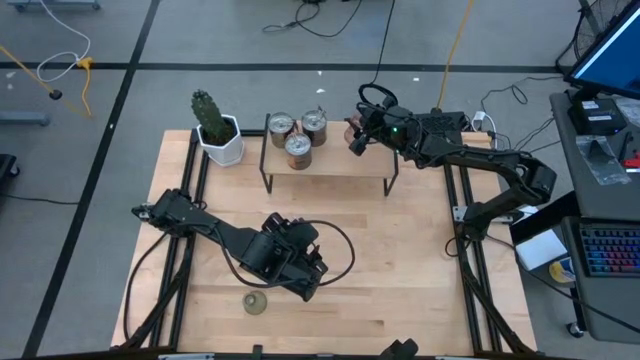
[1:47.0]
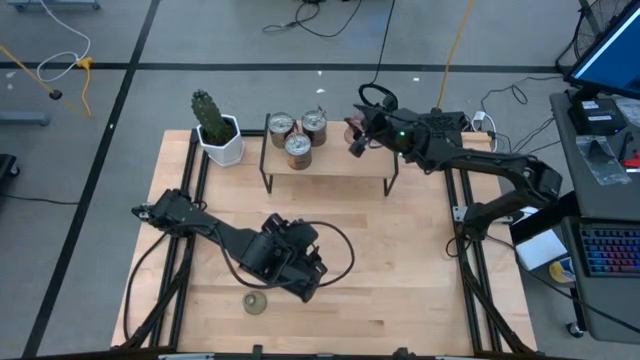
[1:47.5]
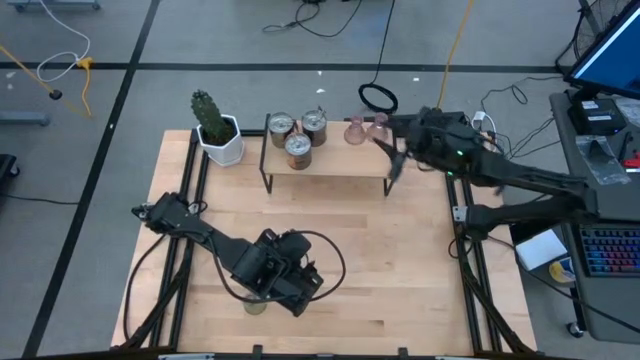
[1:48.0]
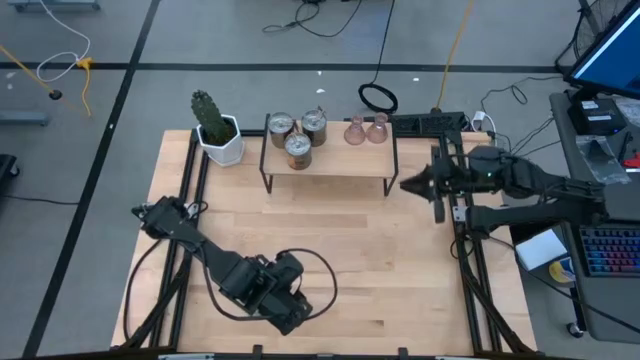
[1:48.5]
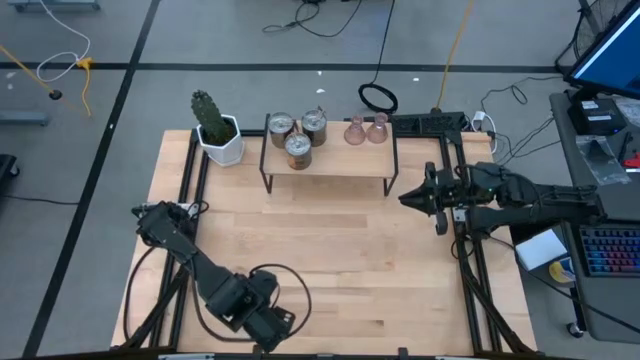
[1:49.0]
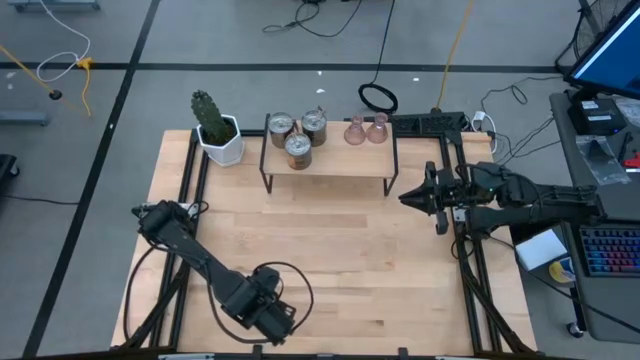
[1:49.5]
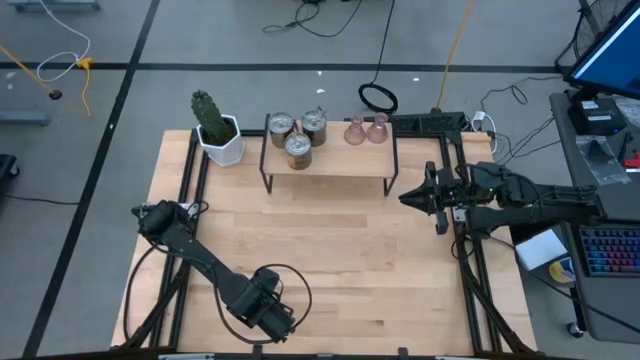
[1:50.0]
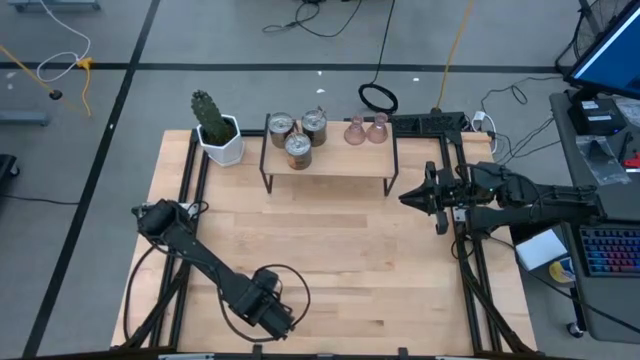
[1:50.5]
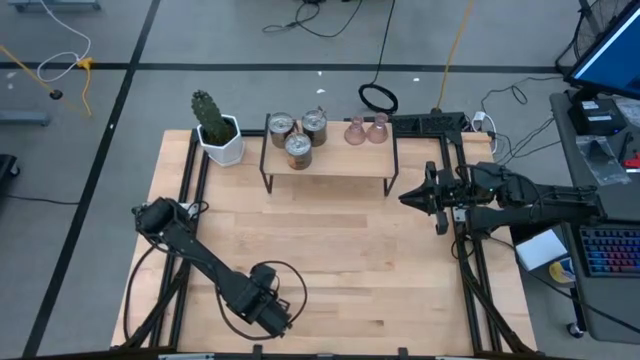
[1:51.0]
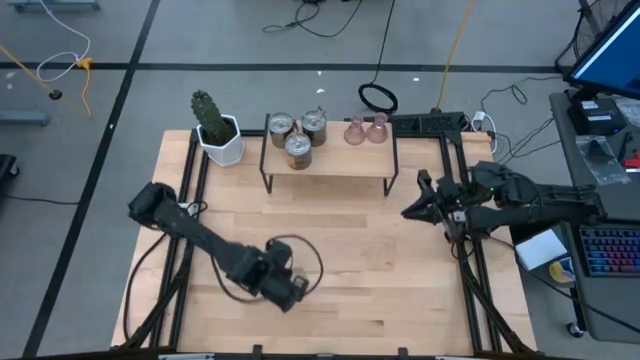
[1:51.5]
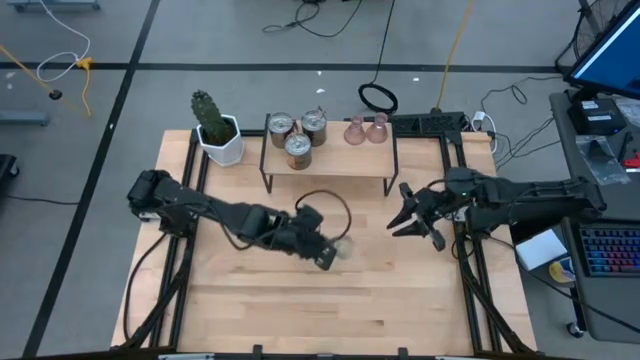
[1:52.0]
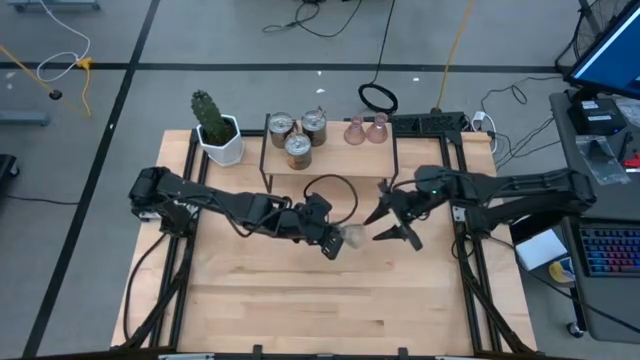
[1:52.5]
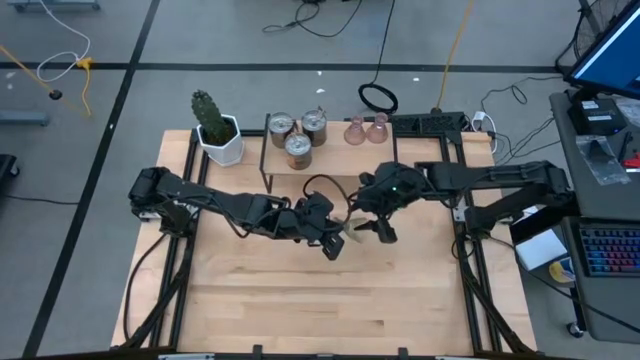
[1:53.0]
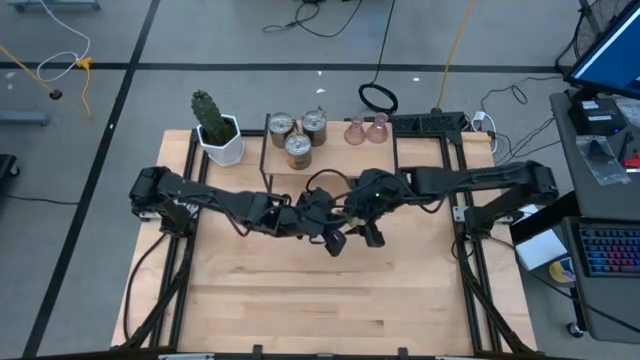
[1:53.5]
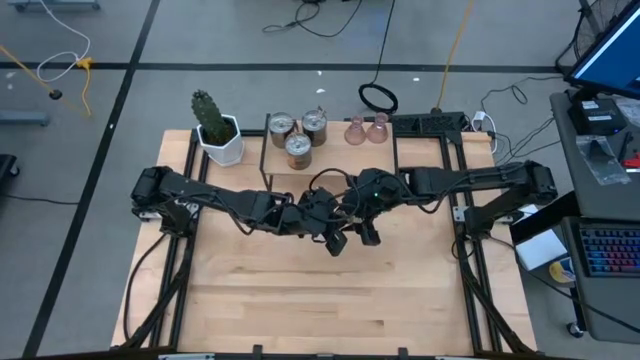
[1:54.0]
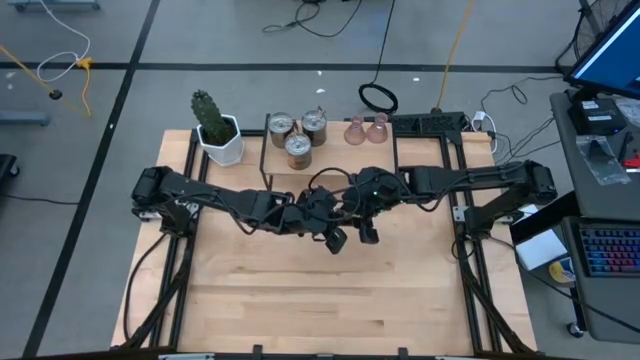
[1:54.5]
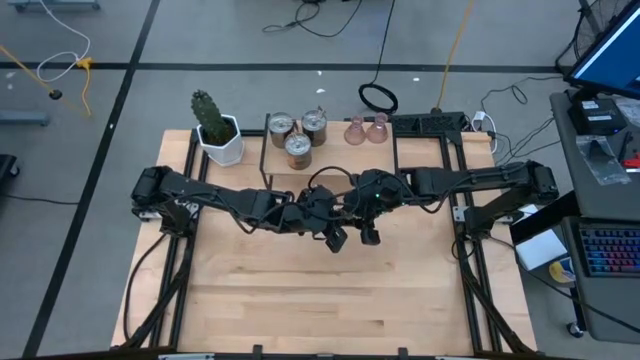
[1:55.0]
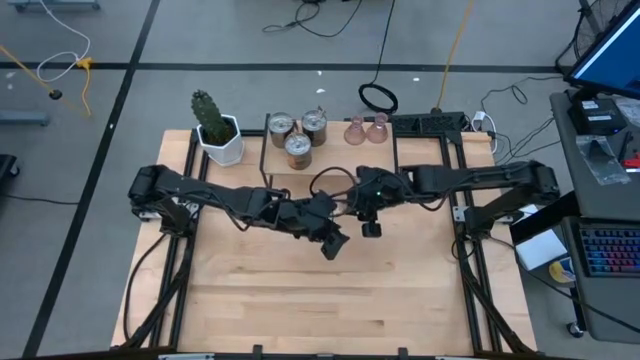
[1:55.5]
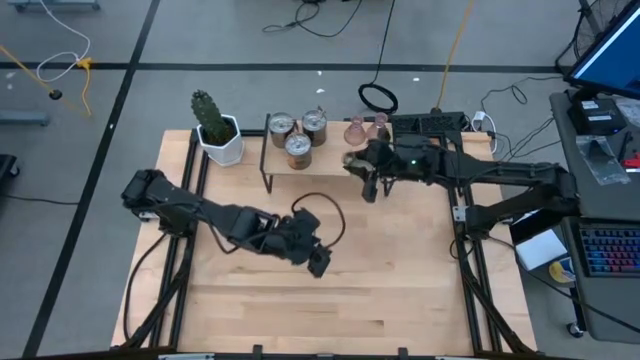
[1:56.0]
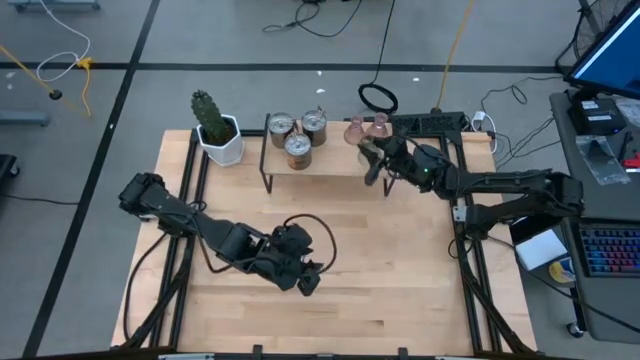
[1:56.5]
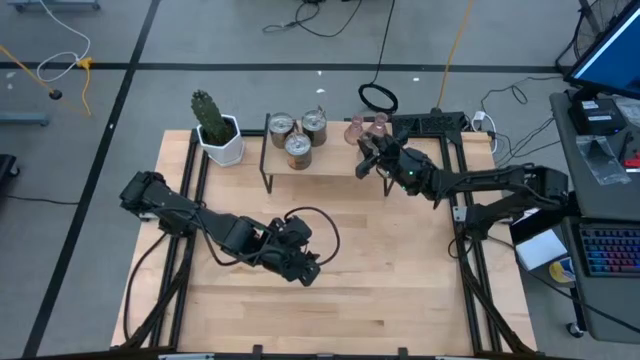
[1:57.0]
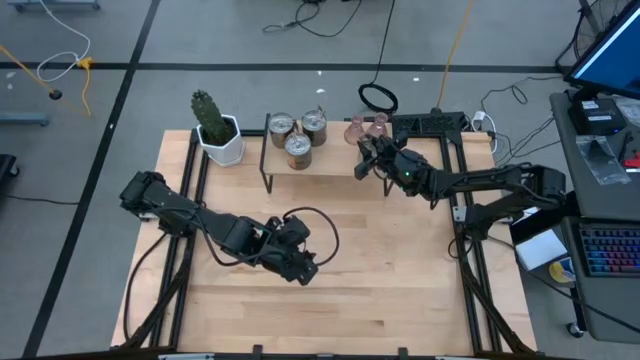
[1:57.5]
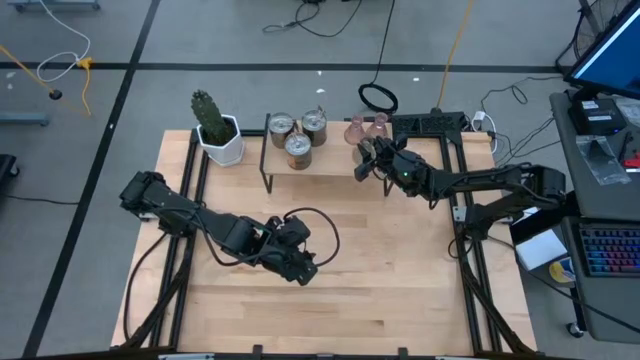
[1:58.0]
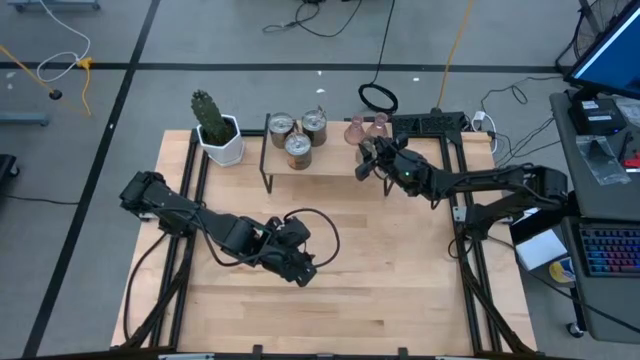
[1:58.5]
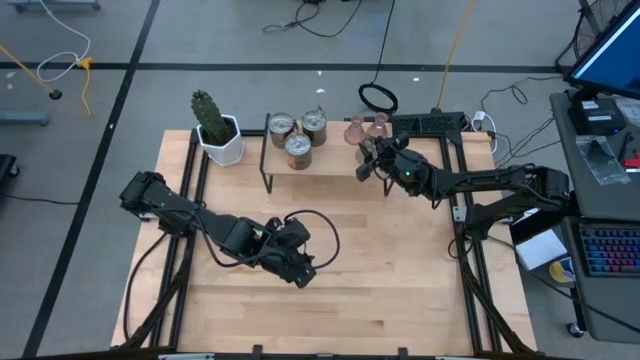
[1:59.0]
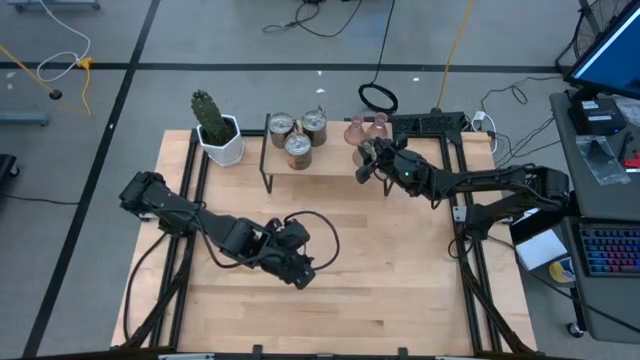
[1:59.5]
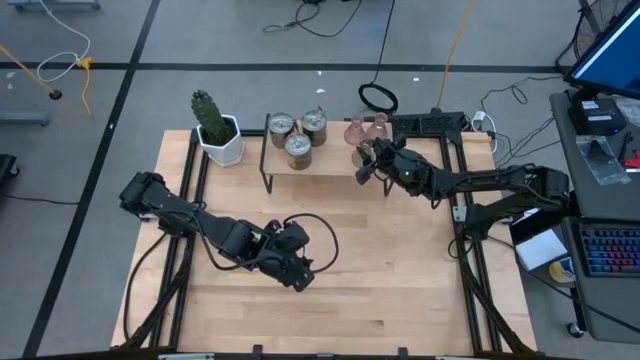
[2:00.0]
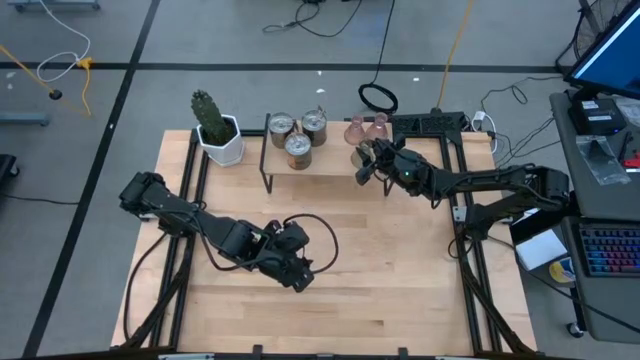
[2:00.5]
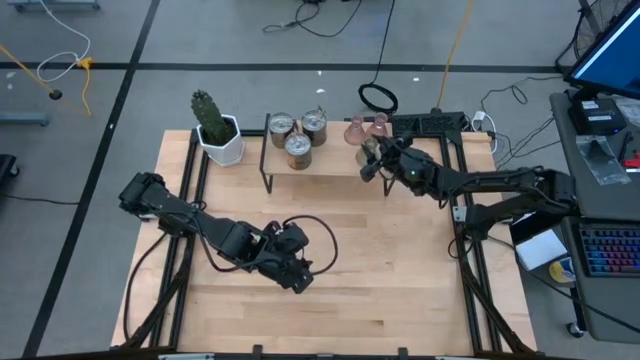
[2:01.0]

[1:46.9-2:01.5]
Task: Pick & Place candle stick holders
Put the green glass candle holder on the shelf

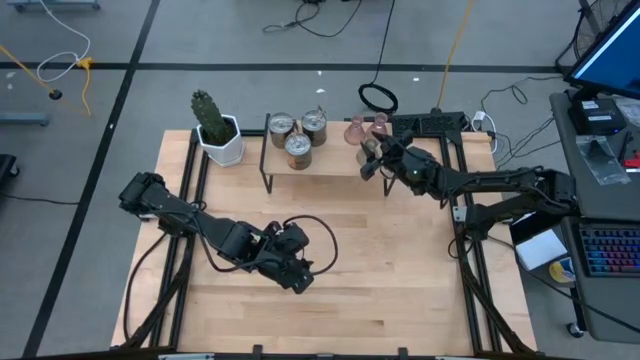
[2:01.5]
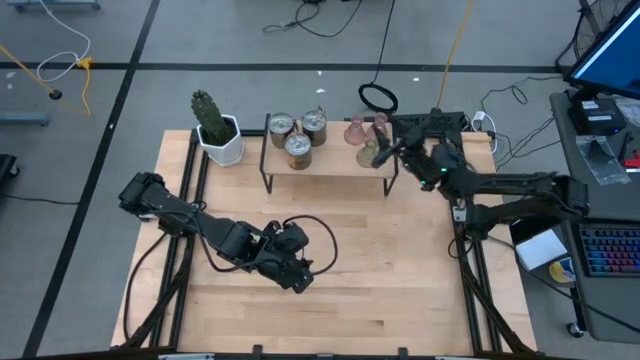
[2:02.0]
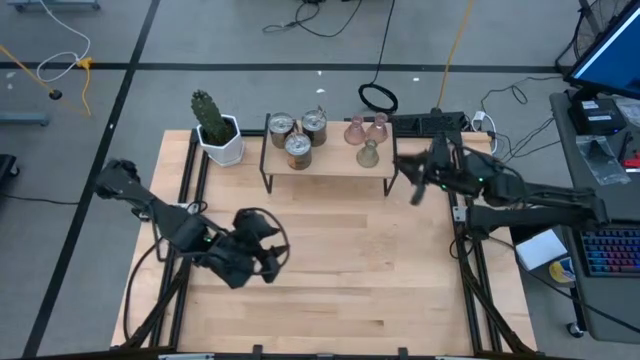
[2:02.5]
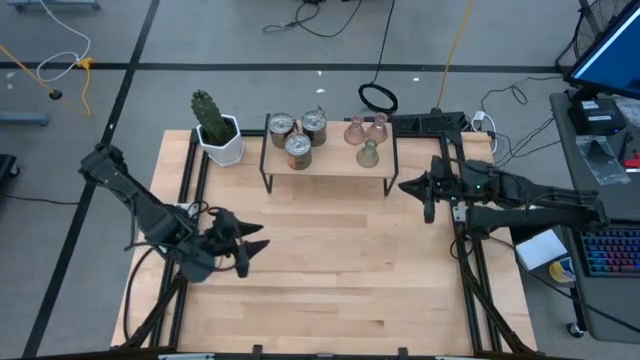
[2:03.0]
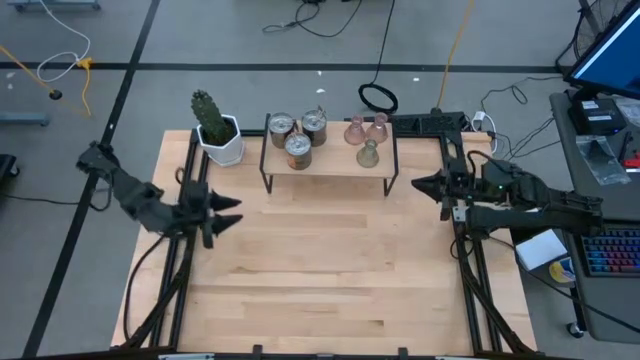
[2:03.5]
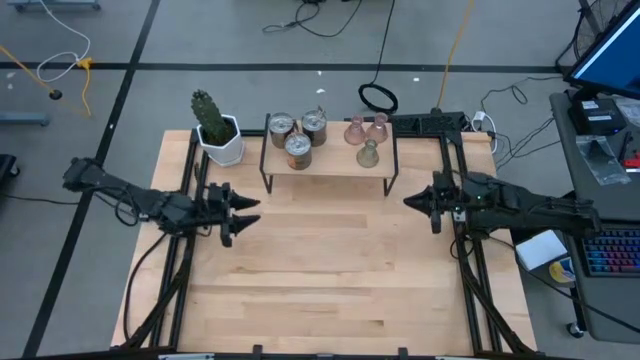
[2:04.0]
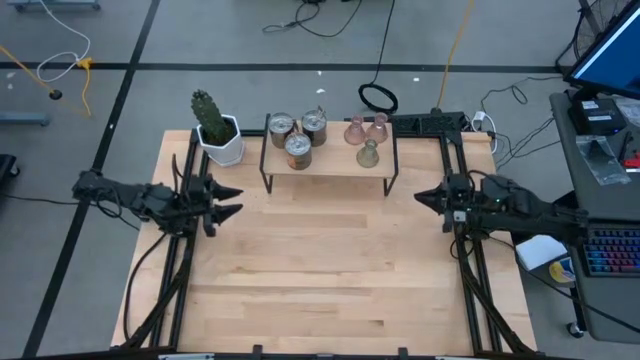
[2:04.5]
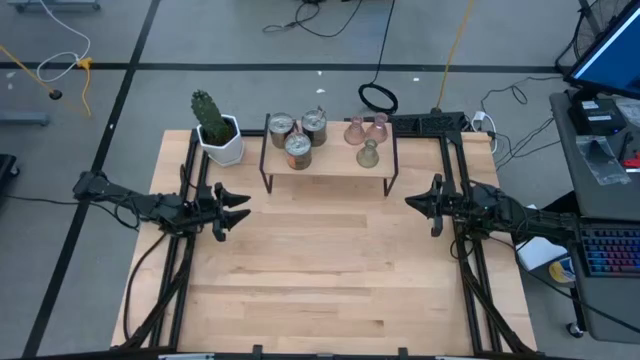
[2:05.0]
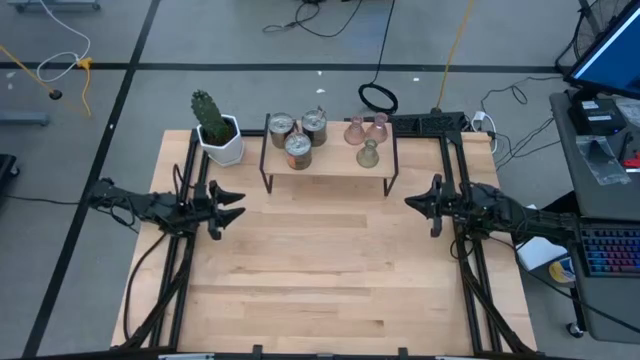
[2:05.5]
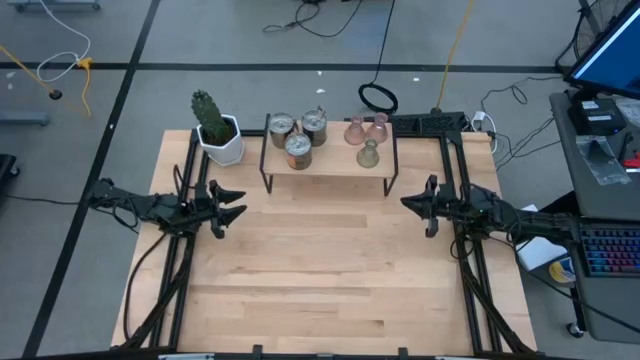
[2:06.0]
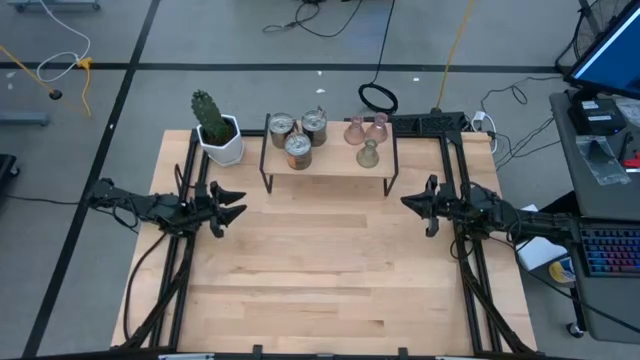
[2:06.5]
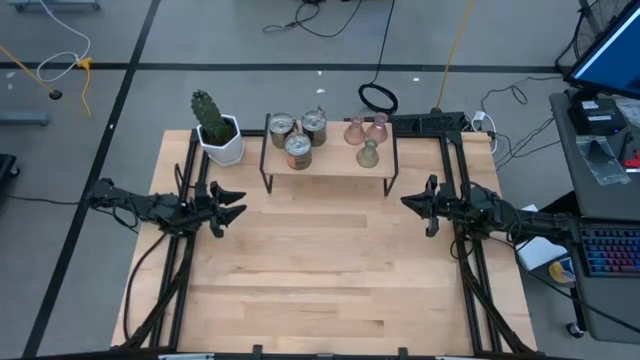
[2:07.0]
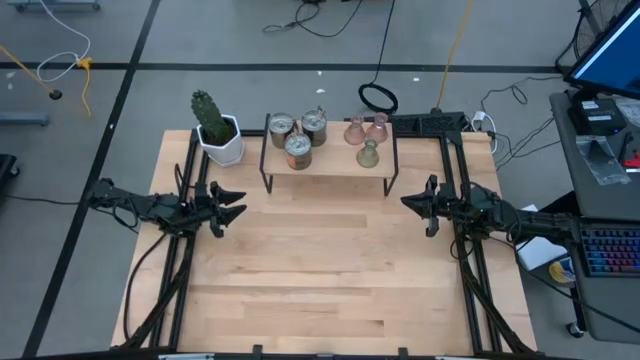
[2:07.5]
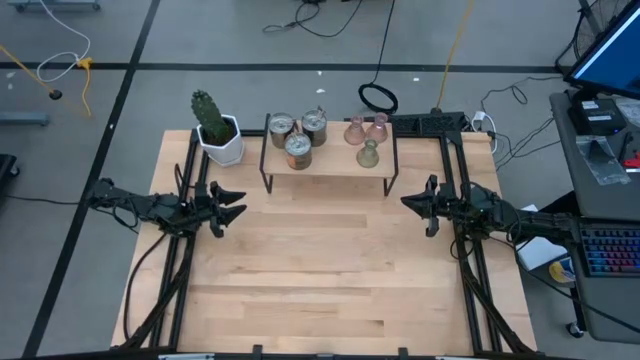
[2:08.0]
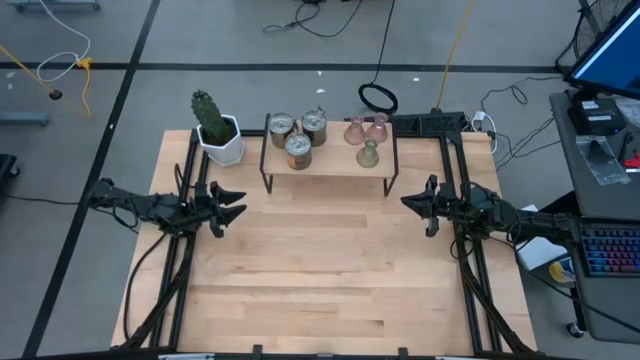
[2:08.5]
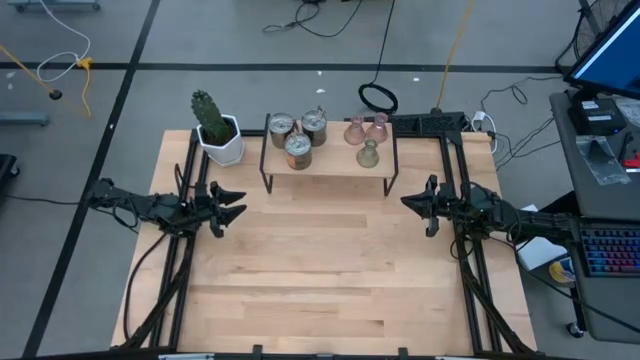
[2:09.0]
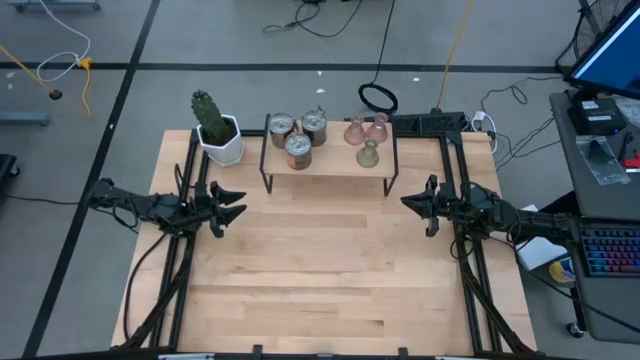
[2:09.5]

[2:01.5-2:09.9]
Return to Home Position
